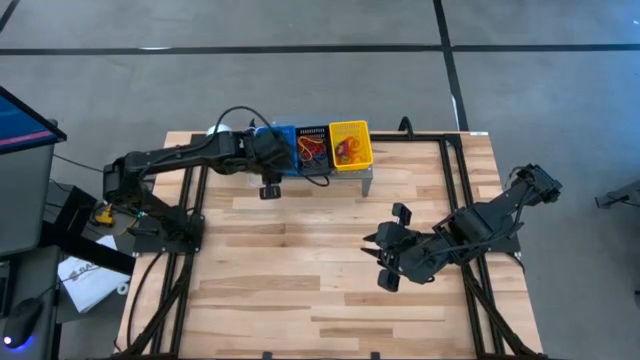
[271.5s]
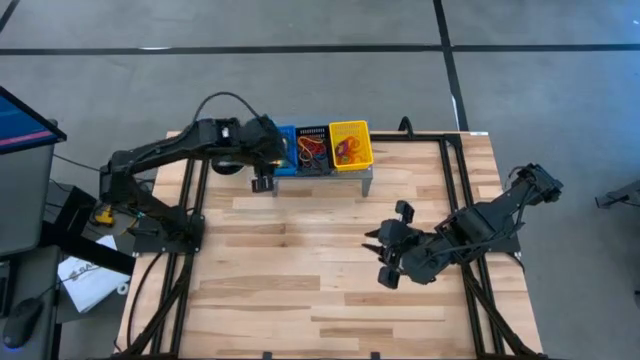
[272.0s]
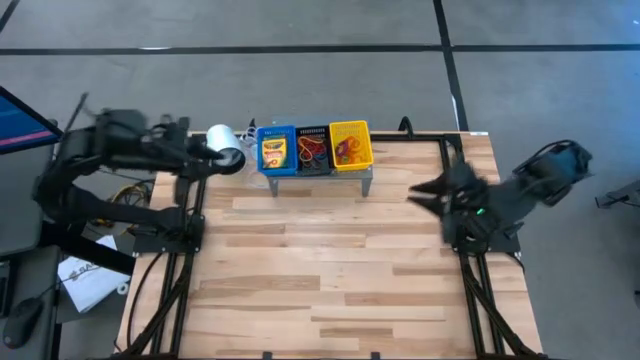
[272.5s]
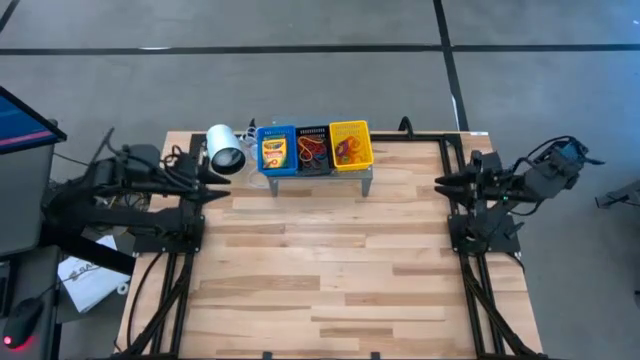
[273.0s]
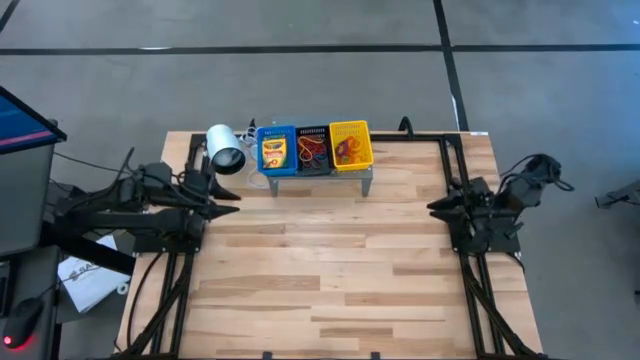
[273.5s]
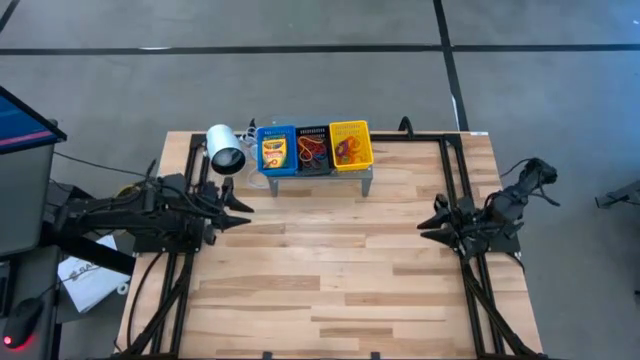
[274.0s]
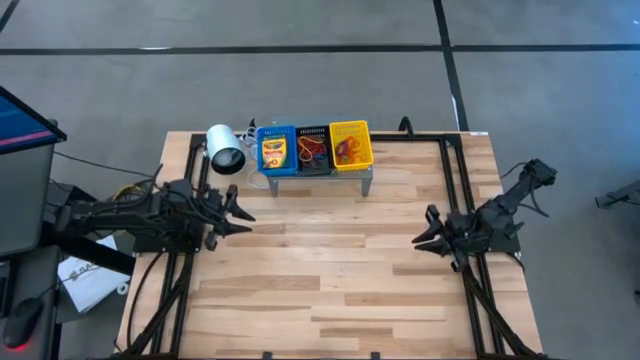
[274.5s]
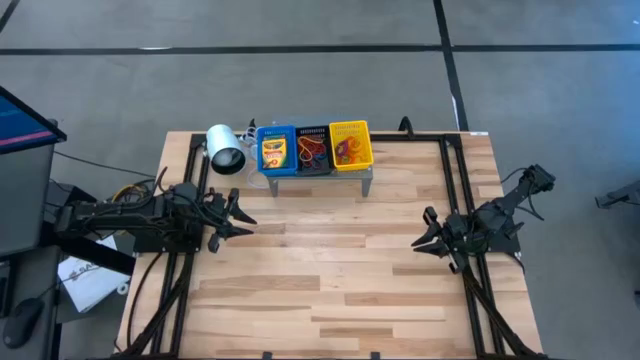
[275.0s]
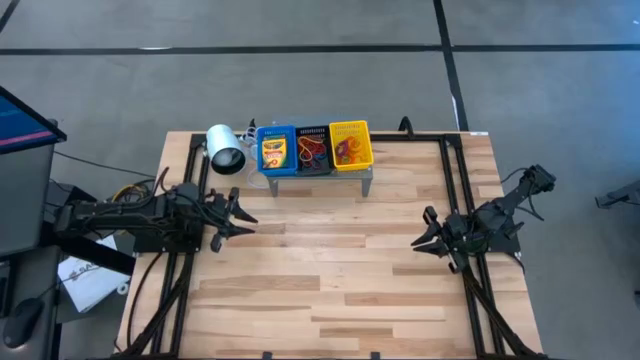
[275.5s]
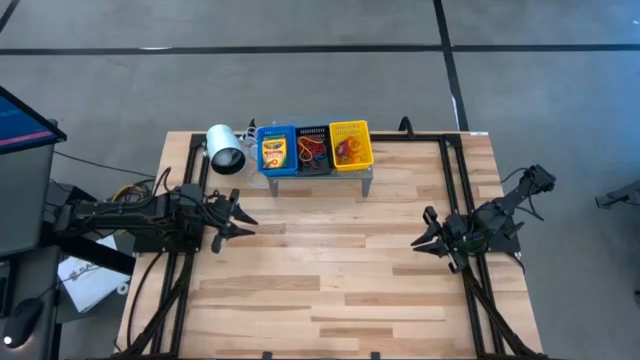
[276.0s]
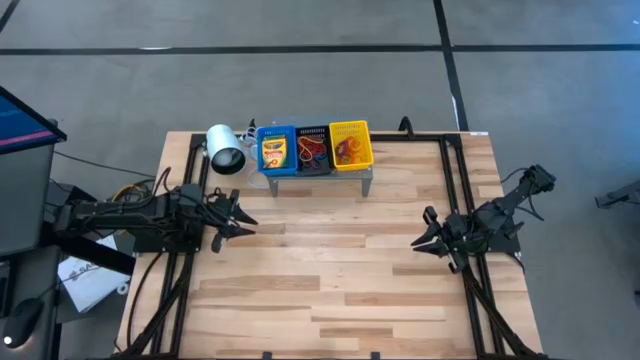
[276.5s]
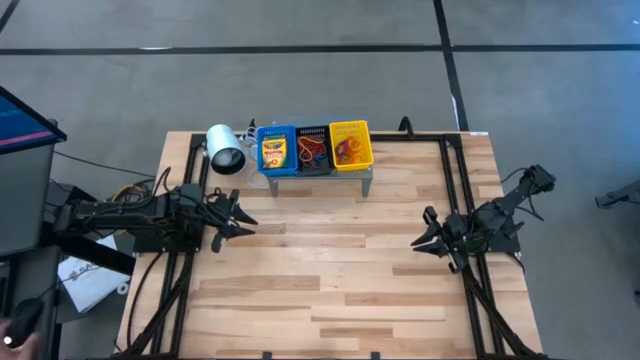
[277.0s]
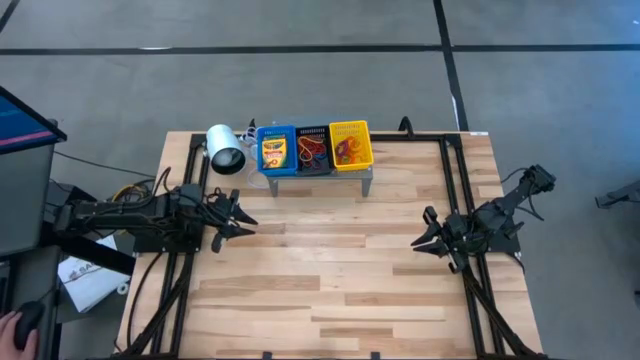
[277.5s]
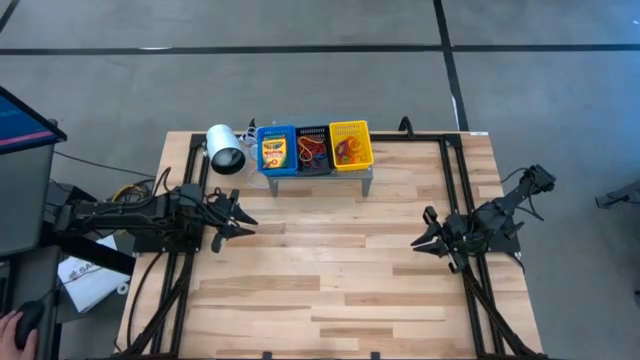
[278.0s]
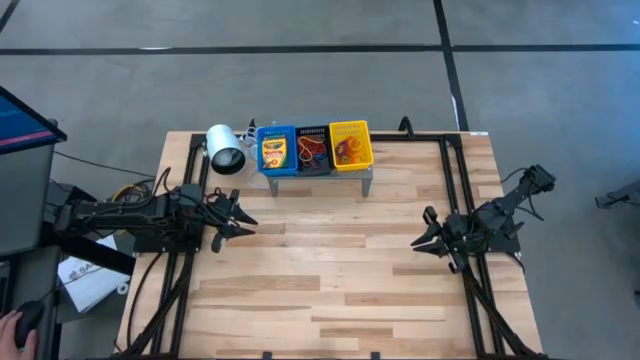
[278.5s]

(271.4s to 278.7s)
Task: Pick & Place Office Desk Supplies
Return to Home Position

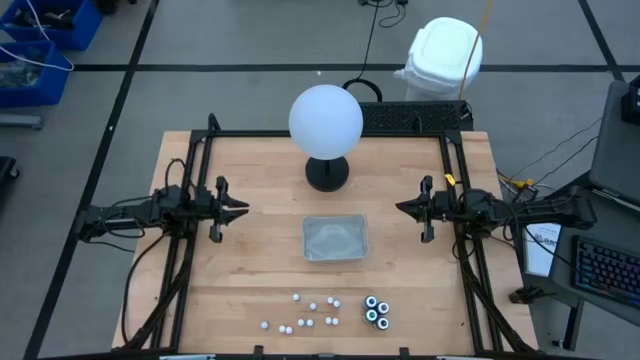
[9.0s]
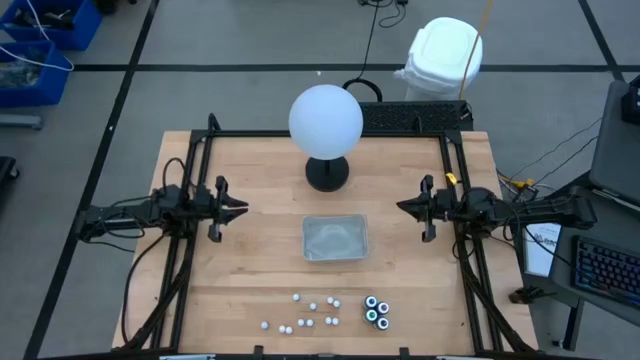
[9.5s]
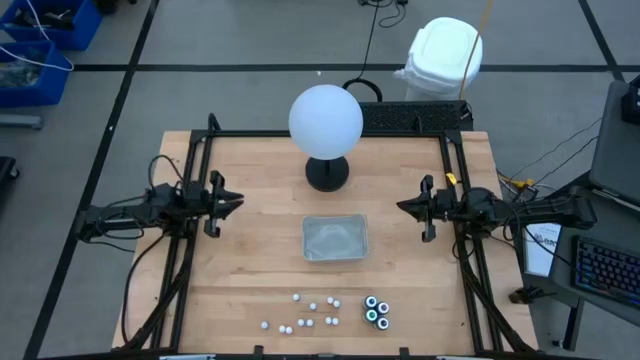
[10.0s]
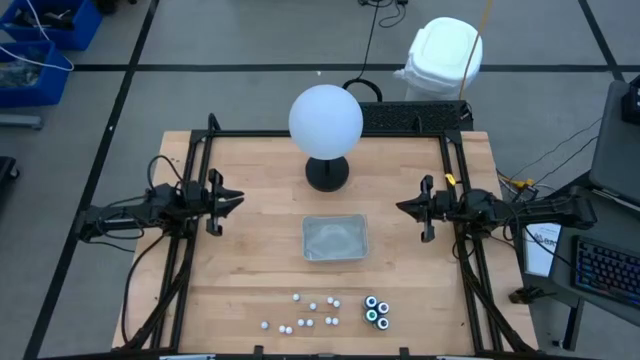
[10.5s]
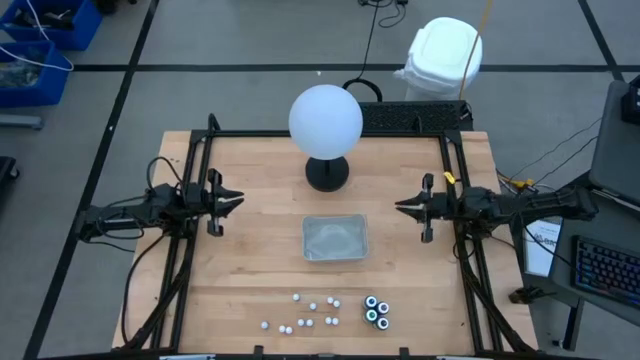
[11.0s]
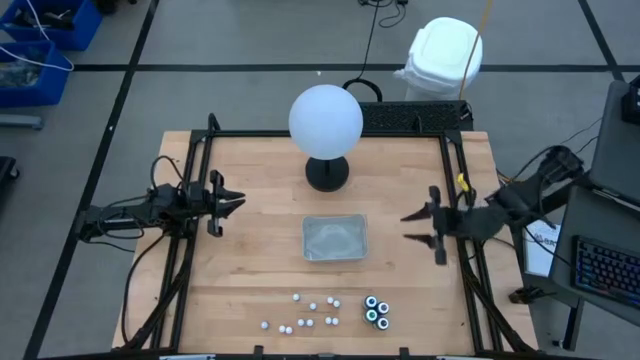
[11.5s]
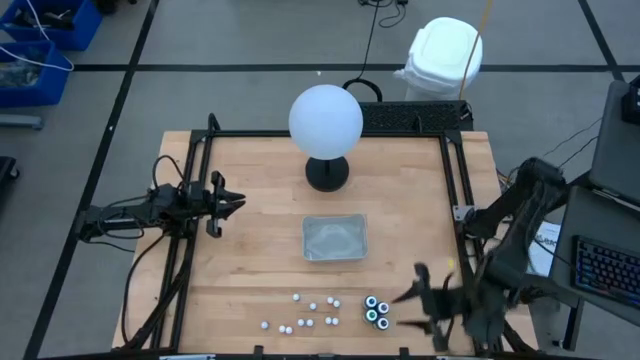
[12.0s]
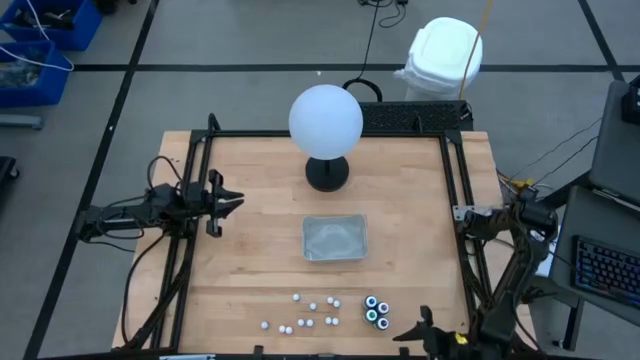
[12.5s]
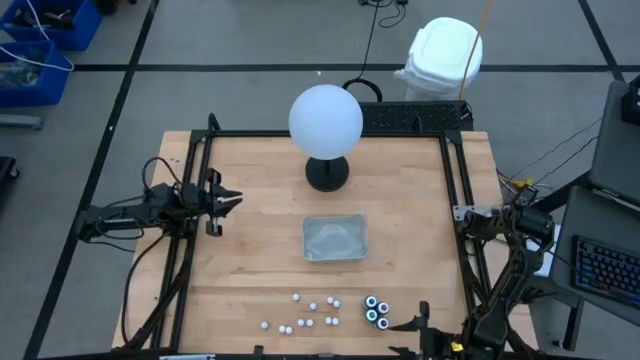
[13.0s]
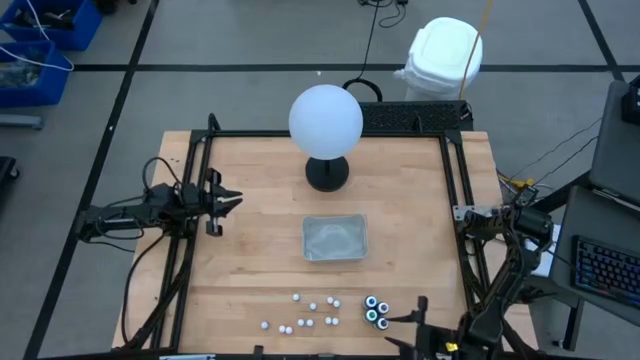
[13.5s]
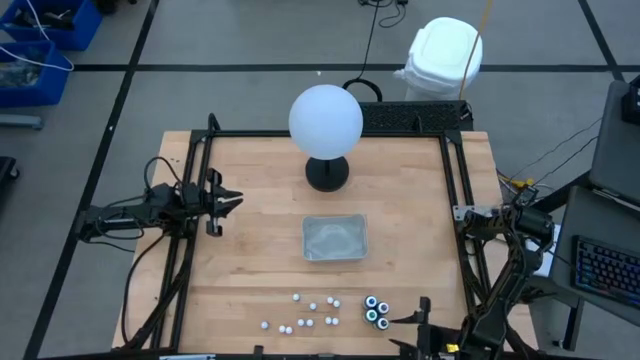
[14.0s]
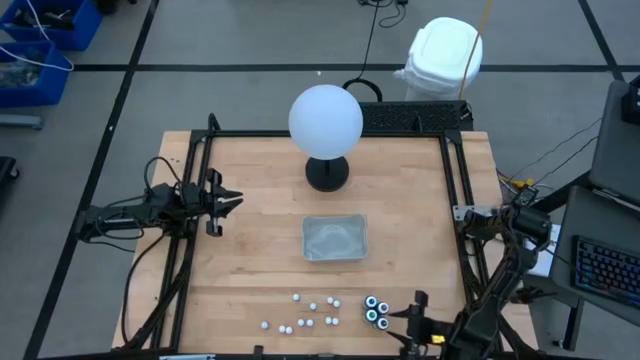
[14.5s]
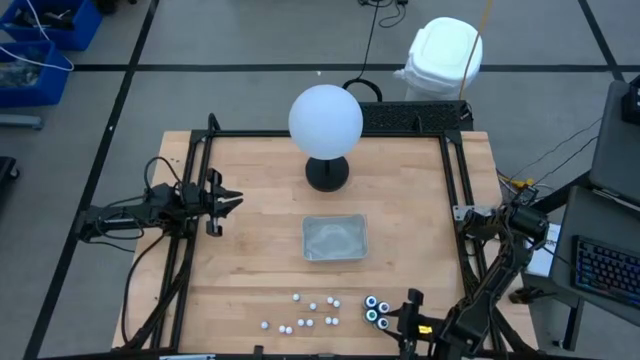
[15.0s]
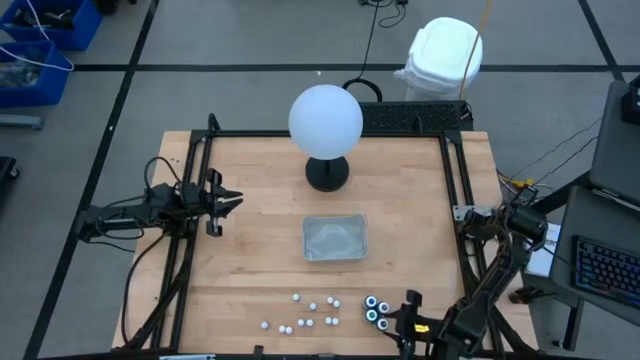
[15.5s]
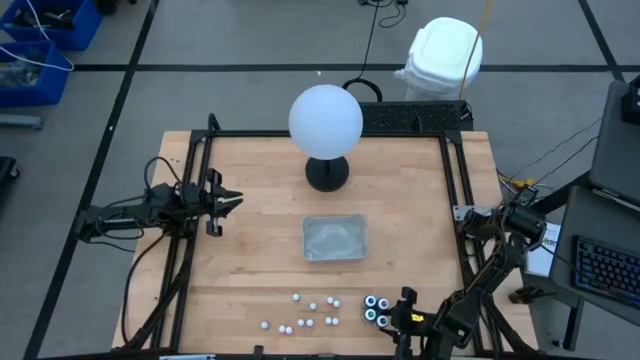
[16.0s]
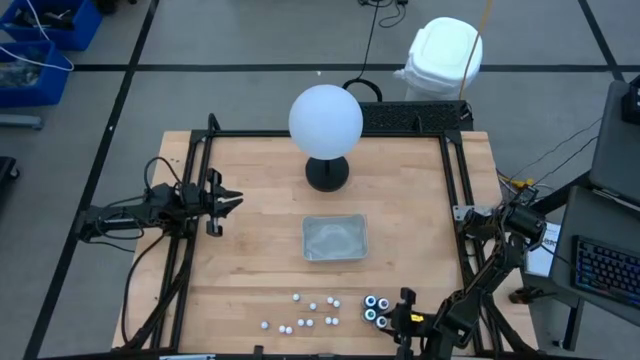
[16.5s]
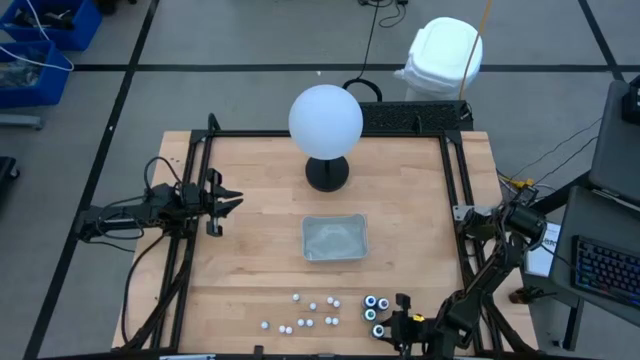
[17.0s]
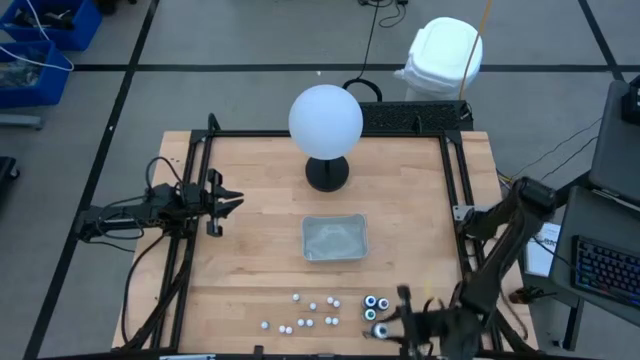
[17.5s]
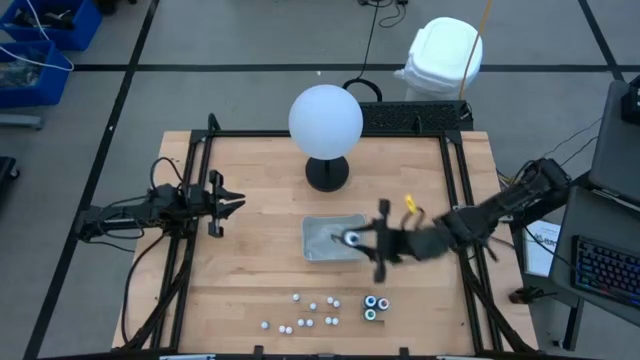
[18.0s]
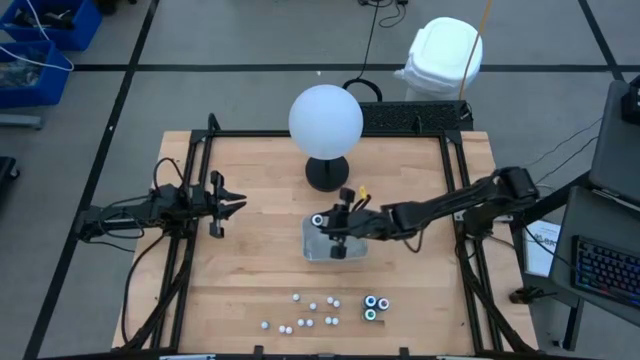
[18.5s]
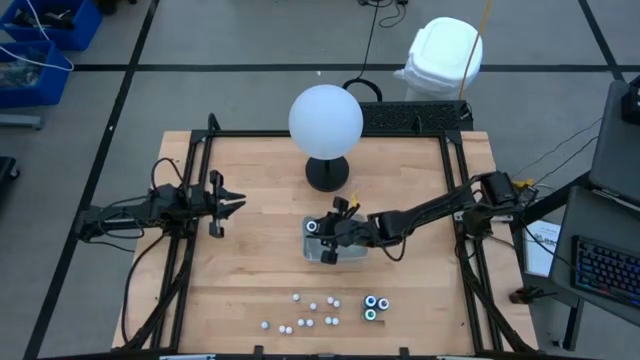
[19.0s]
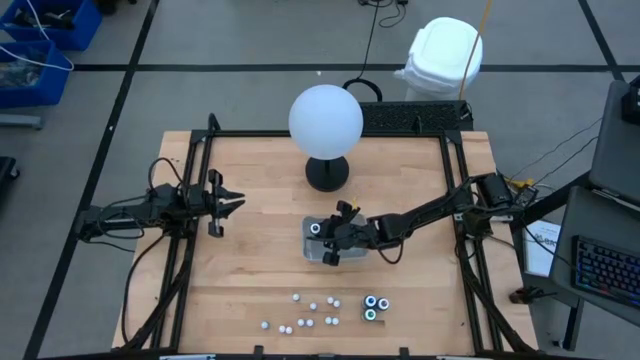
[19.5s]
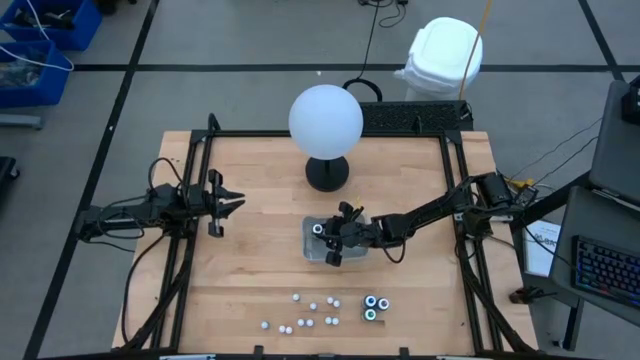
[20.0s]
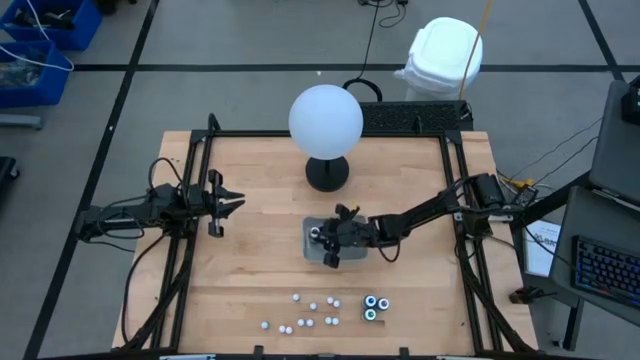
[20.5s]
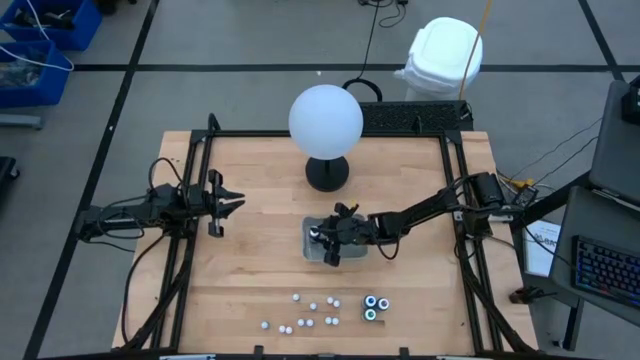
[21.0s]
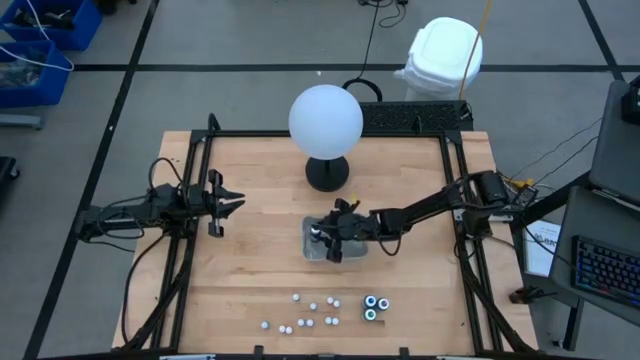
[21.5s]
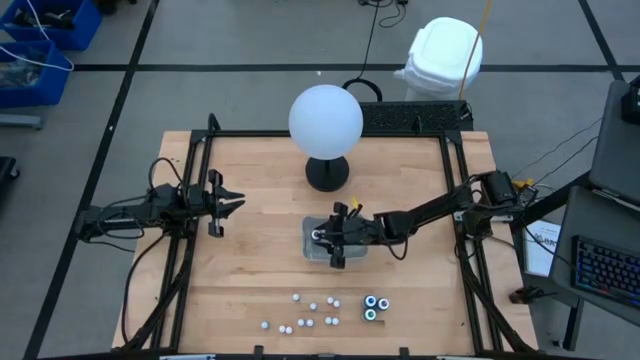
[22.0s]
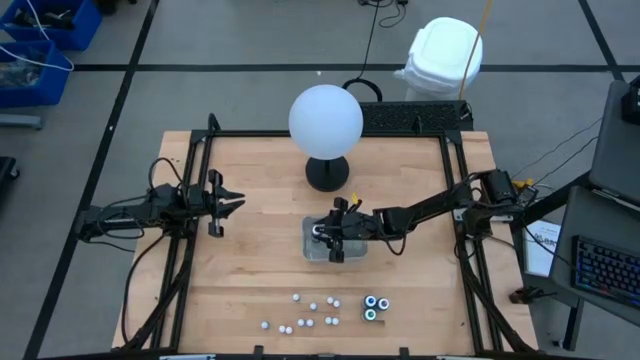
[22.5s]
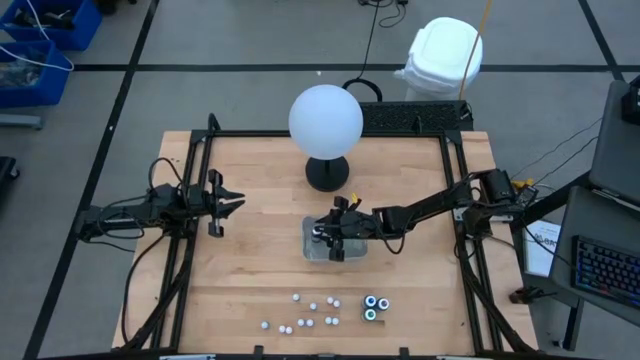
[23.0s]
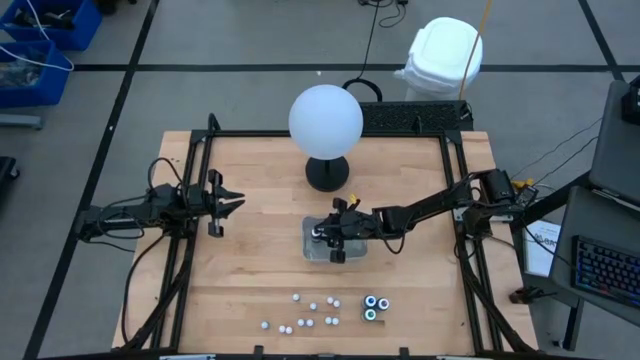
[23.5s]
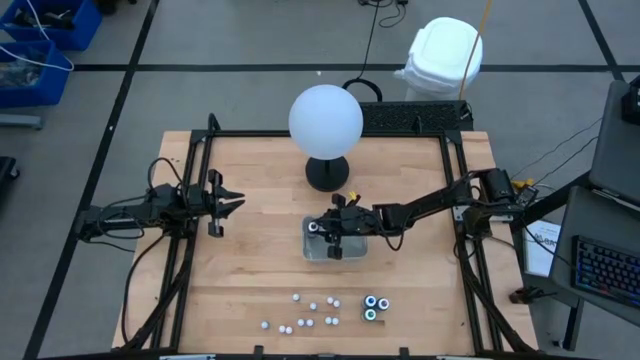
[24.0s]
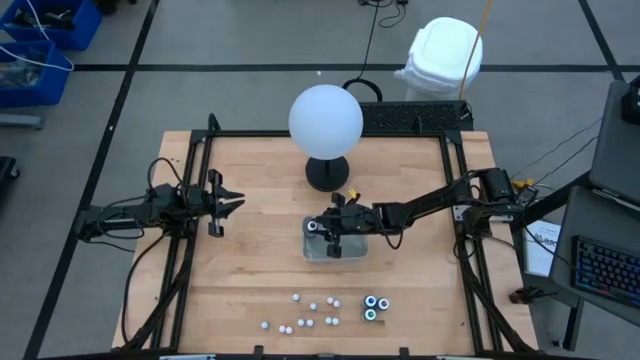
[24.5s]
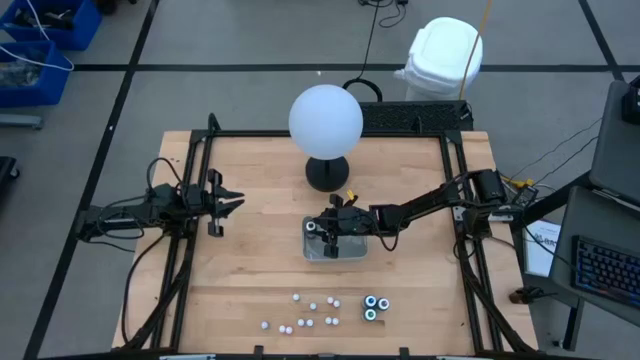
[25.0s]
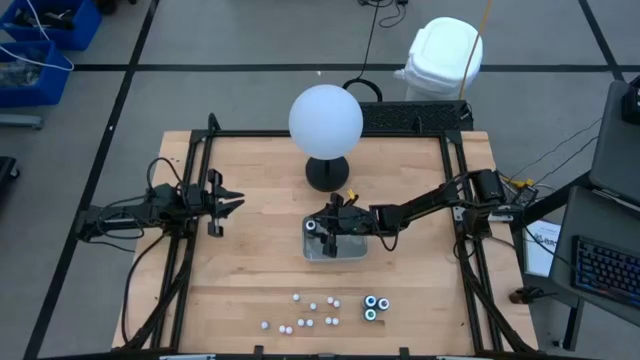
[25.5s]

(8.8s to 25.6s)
Task: Pick & Place food coloring
Put the large black food coloring bottle into the gray bin
